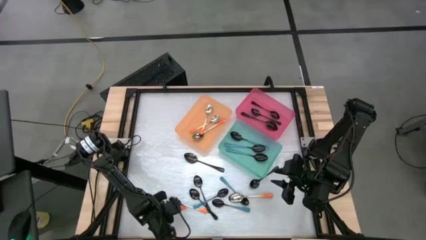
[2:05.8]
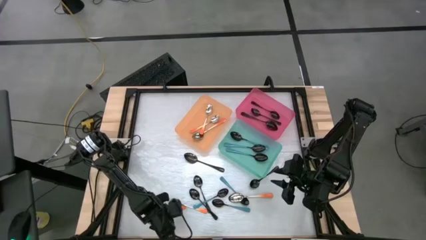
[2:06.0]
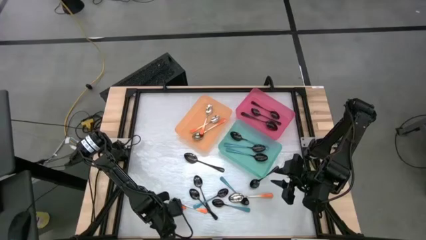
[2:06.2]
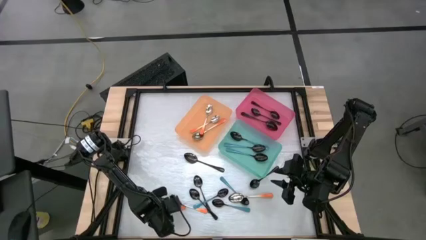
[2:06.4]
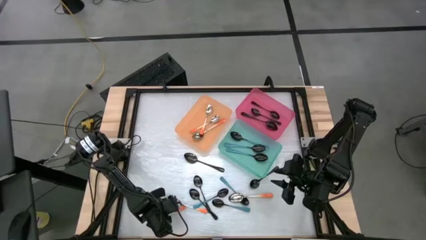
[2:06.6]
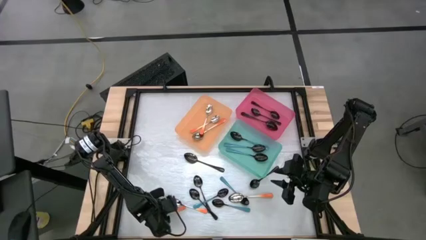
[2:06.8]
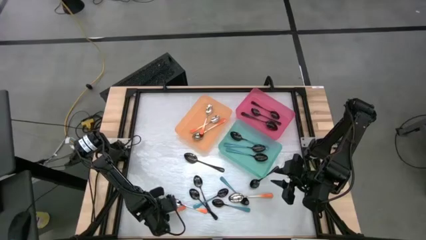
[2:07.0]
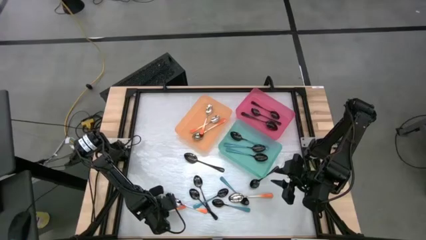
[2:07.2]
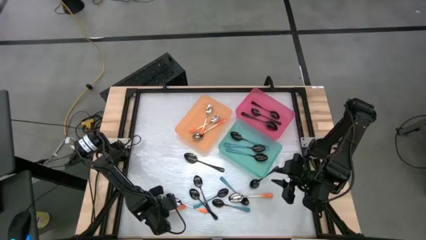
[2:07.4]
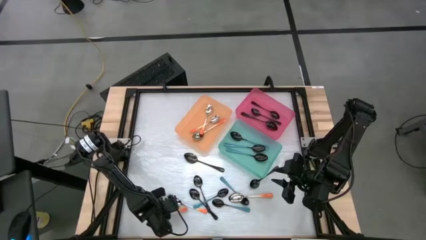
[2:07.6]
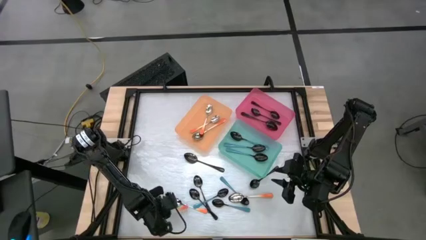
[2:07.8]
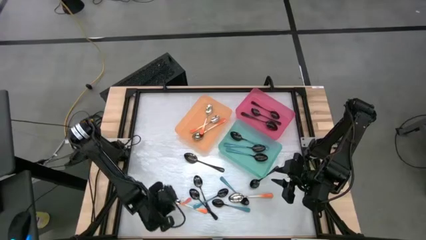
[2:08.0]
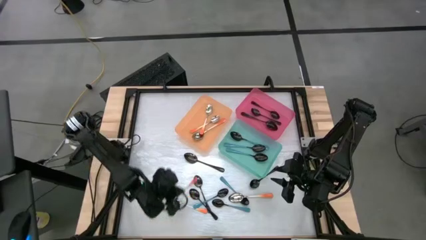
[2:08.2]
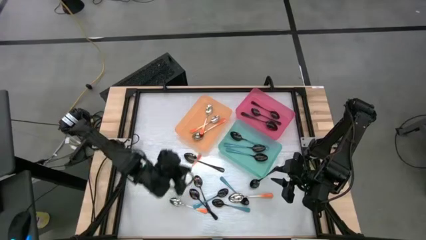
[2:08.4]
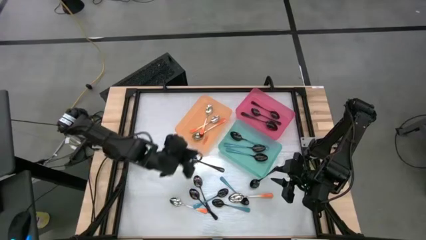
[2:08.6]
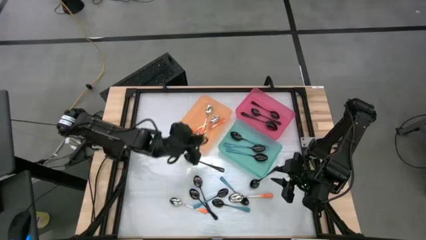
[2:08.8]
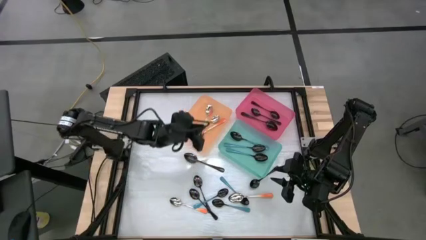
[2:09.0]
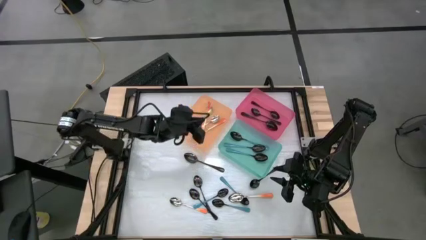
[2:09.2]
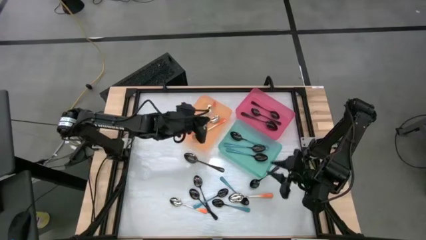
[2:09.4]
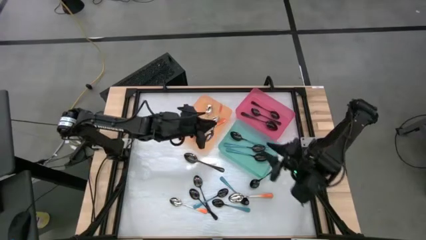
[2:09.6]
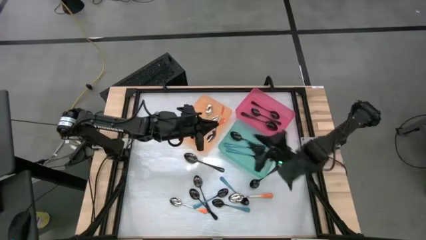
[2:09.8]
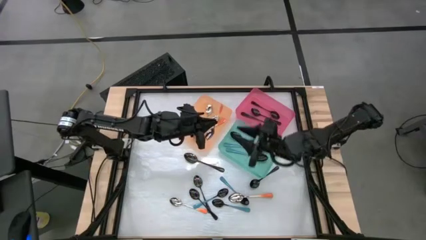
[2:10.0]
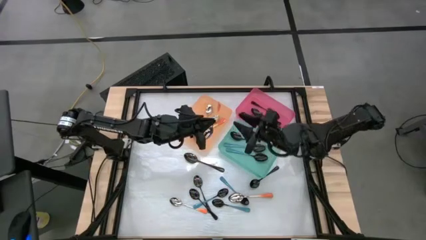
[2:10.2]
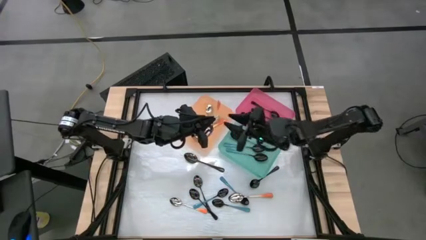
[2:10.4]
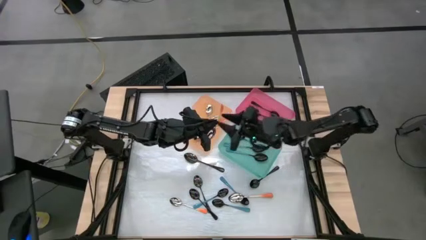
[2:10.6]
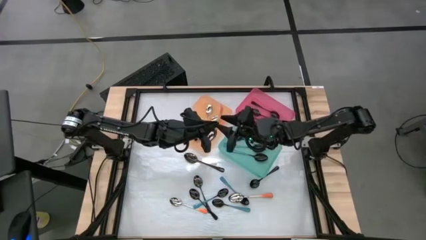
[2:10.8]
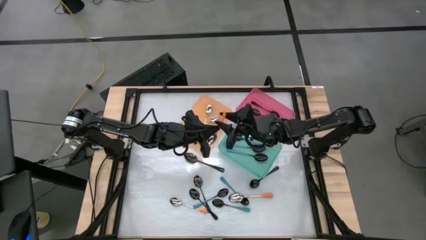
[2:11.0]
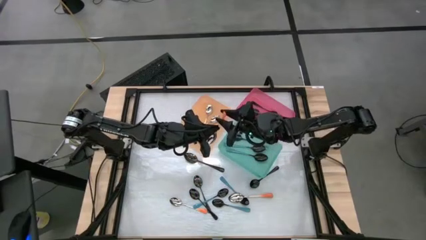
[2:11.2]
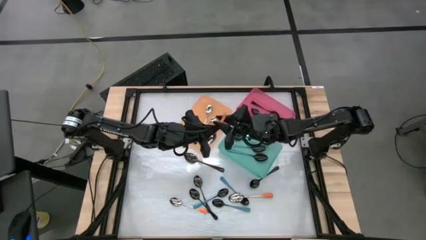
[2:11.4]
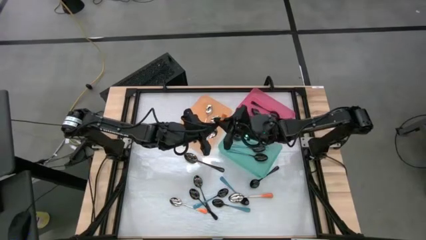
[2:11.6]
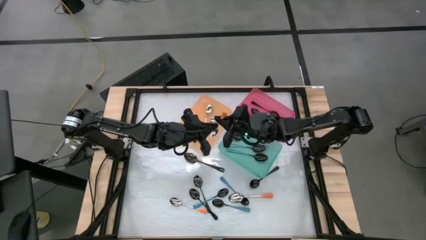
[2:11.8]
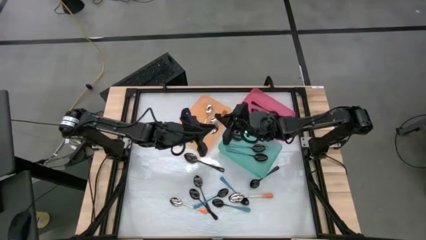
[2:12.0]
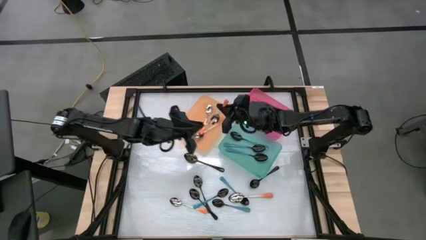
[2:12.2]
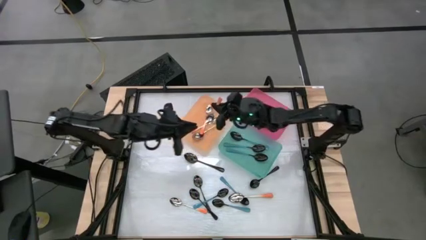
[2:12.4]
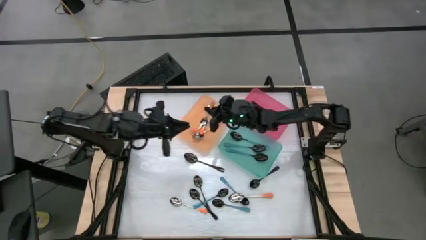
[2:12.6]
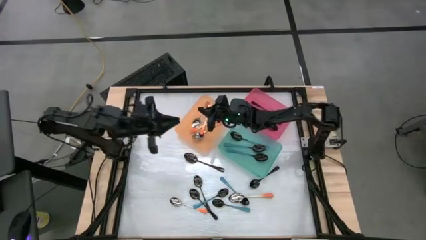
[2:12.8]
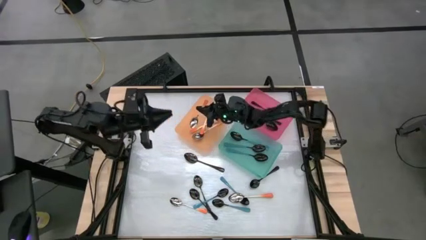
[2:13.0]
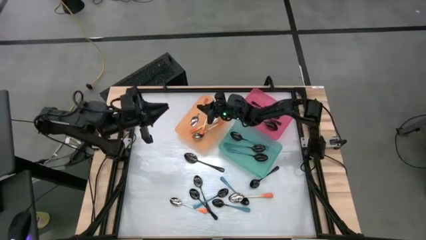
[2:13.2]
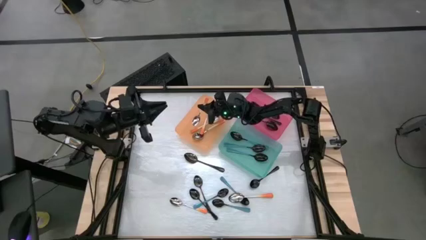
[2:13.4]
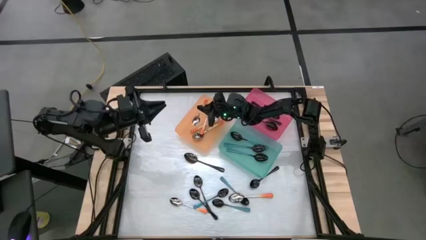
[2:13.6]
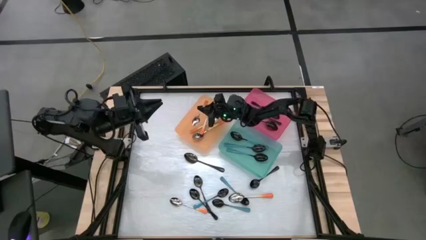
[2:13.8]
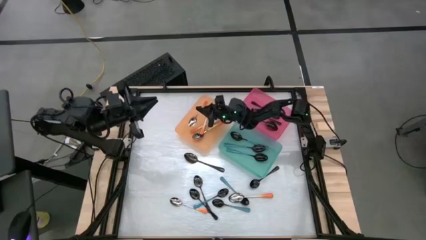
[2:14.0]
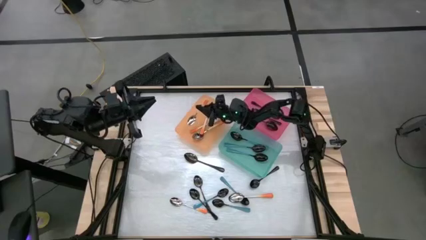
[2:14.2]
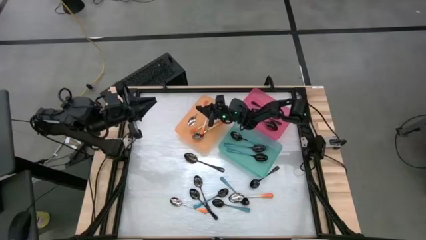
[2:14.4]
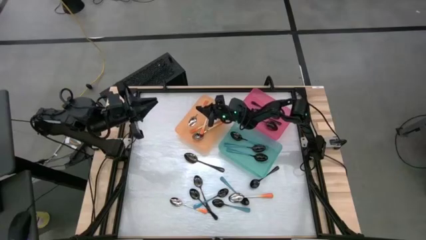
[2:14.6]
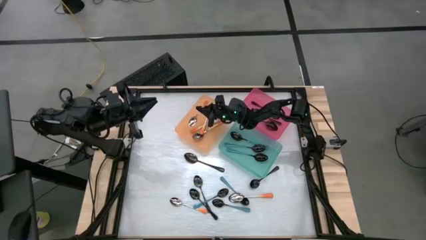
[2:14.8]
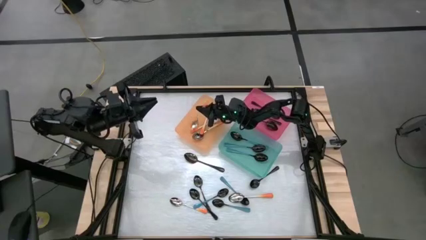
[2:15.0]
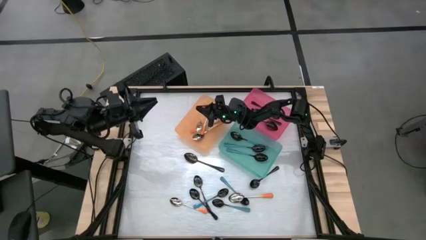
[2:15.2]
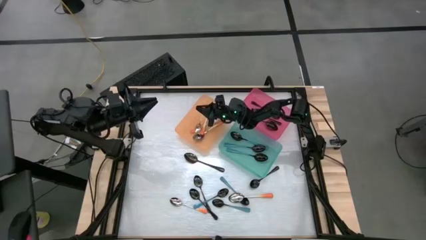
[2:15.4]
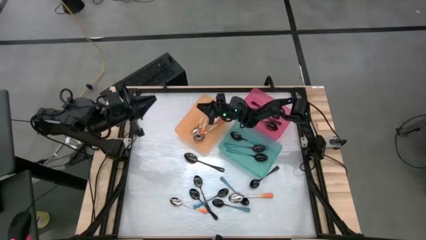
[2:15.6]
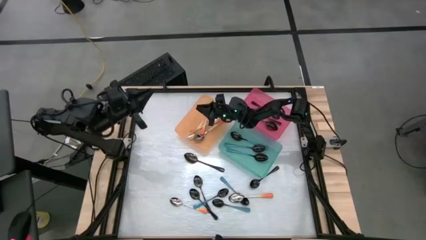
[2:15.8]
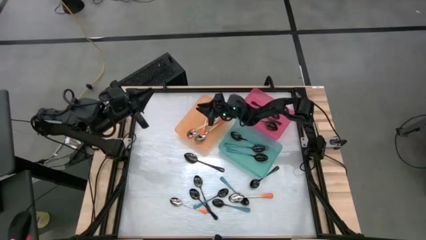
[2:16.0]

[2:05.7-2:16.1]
Task: Sort silverware by color (type)
Put the orange spoon into the orange bin
